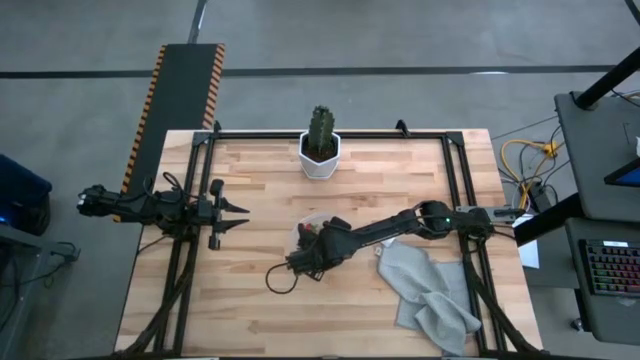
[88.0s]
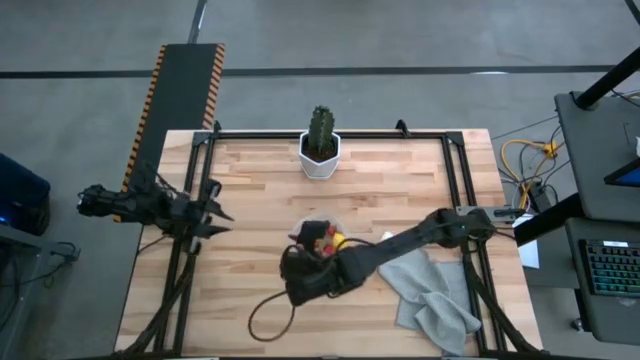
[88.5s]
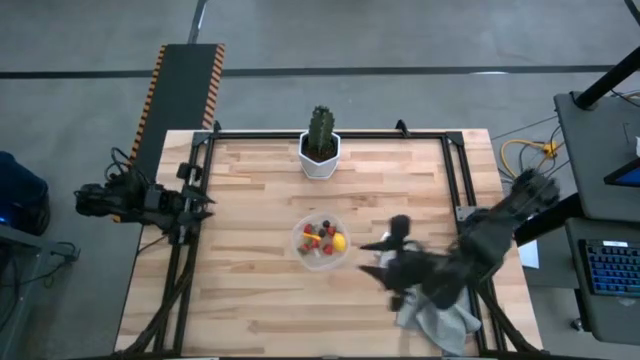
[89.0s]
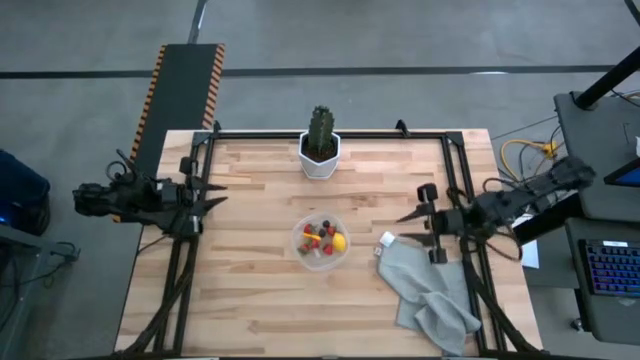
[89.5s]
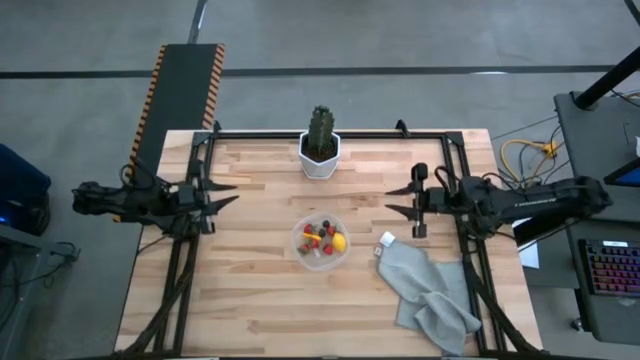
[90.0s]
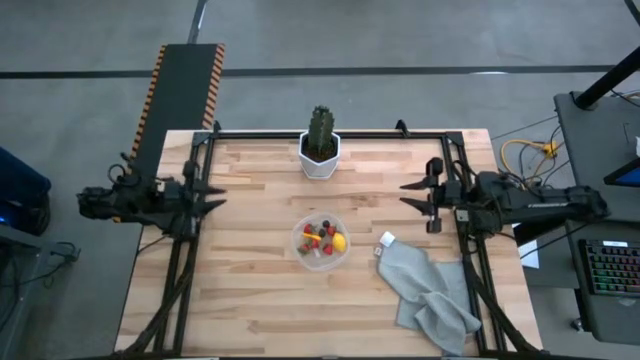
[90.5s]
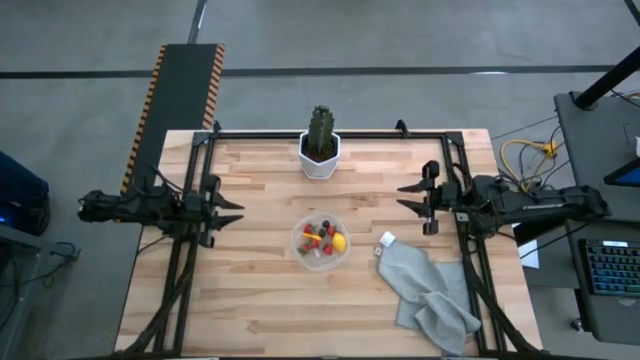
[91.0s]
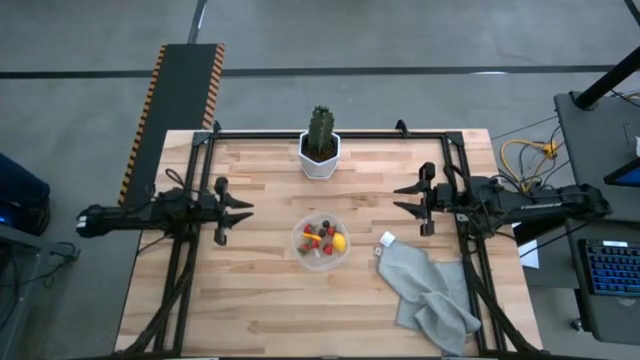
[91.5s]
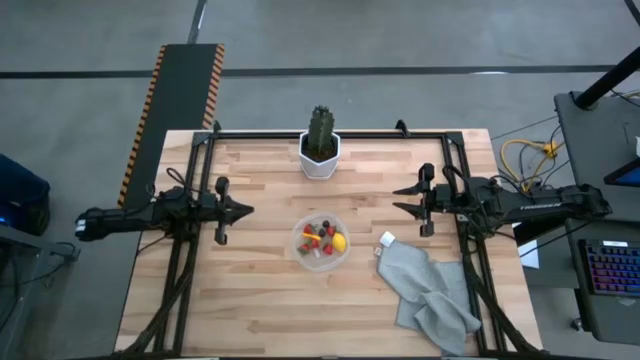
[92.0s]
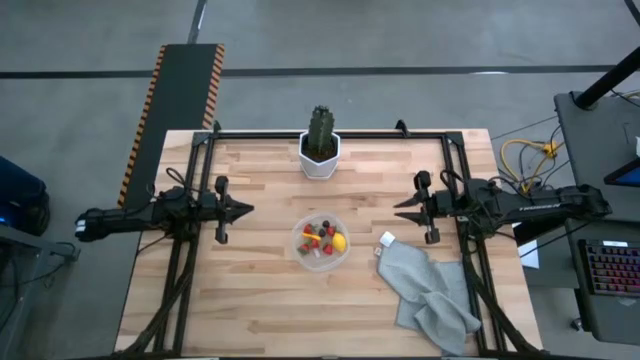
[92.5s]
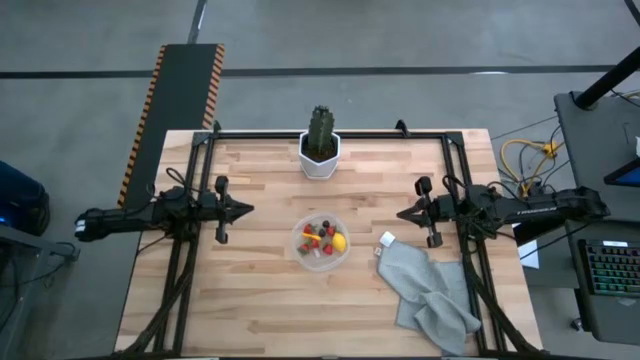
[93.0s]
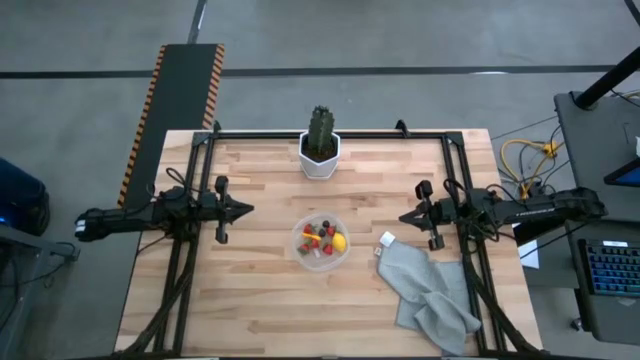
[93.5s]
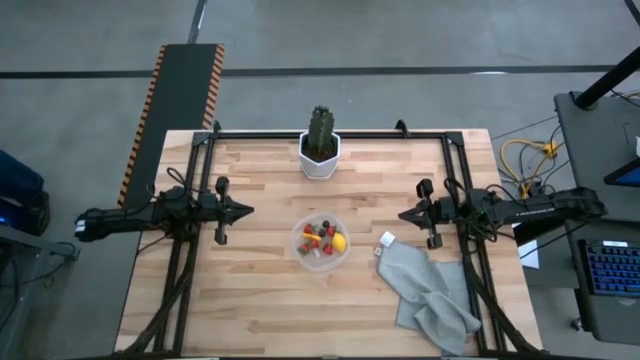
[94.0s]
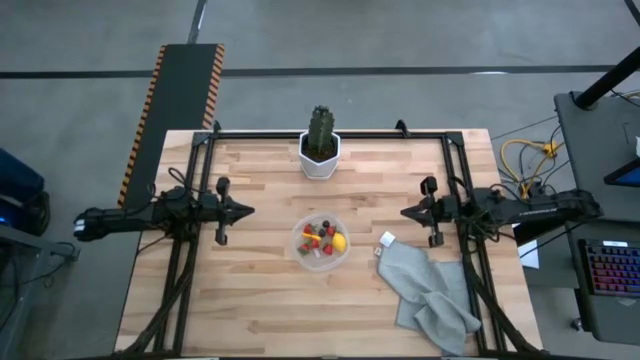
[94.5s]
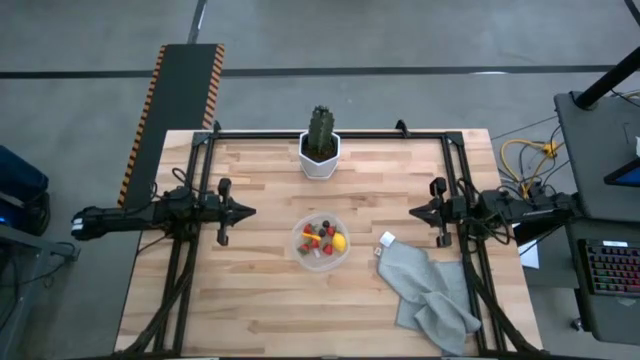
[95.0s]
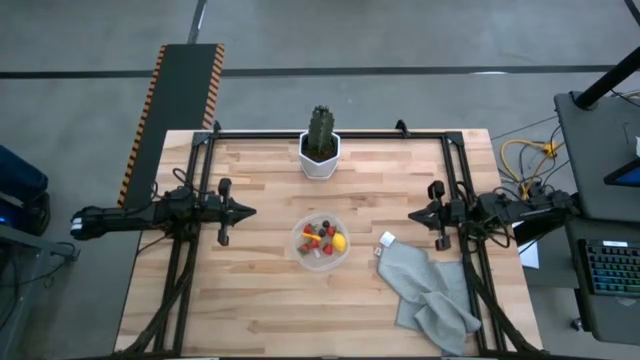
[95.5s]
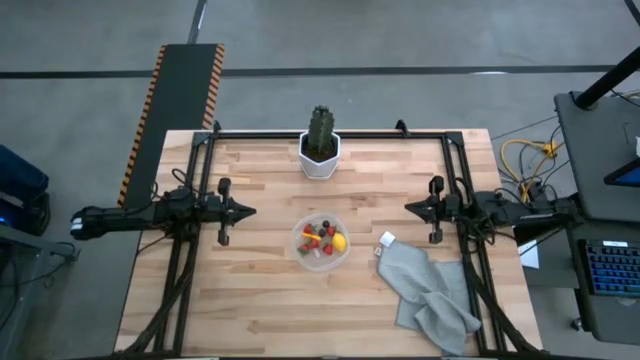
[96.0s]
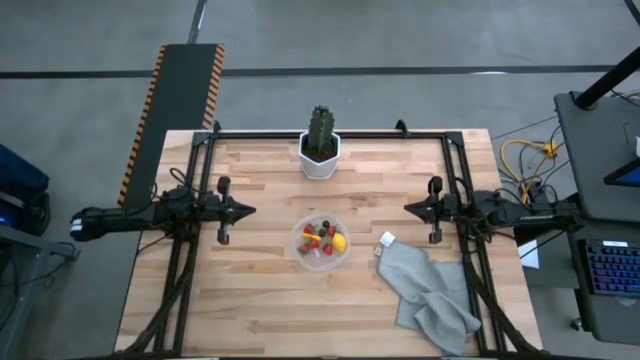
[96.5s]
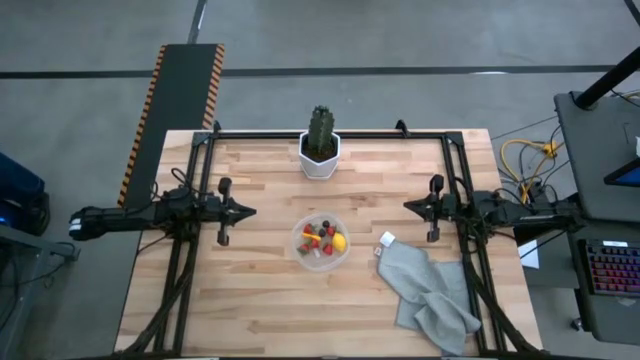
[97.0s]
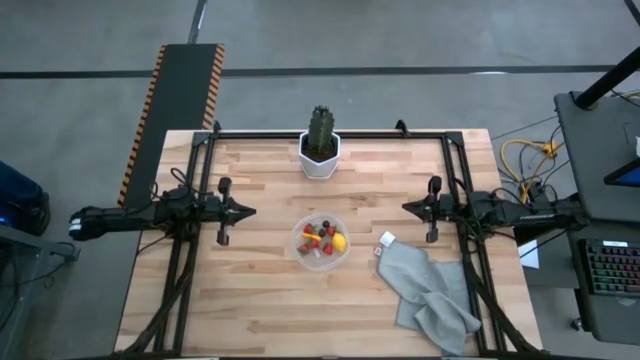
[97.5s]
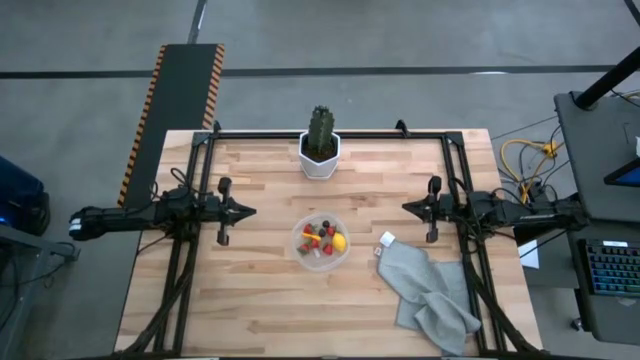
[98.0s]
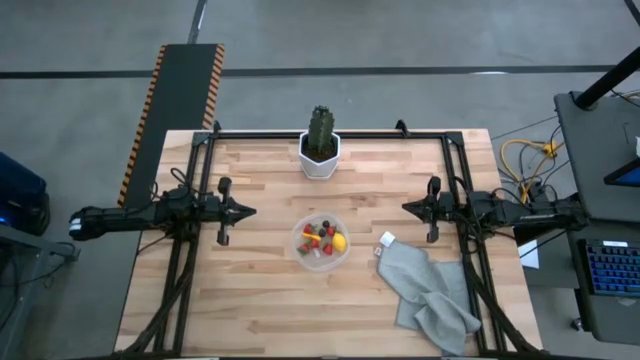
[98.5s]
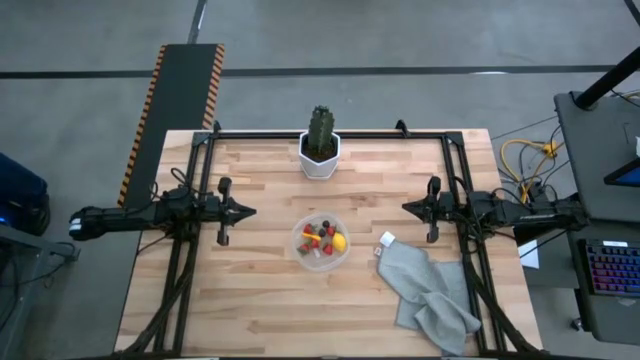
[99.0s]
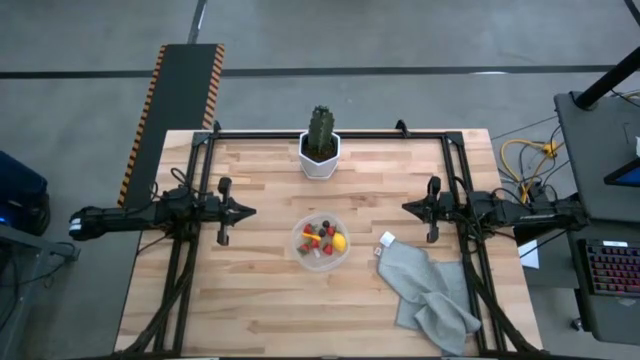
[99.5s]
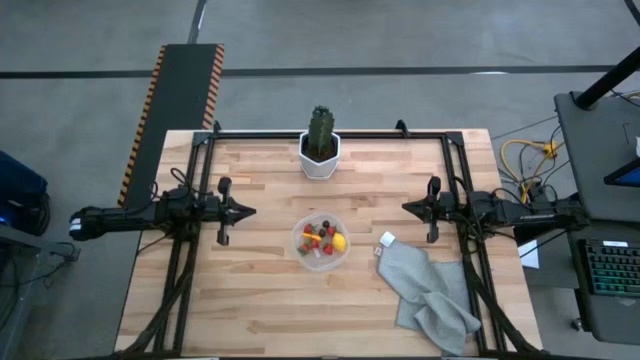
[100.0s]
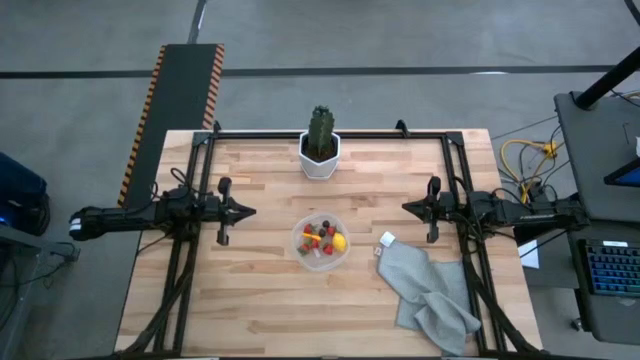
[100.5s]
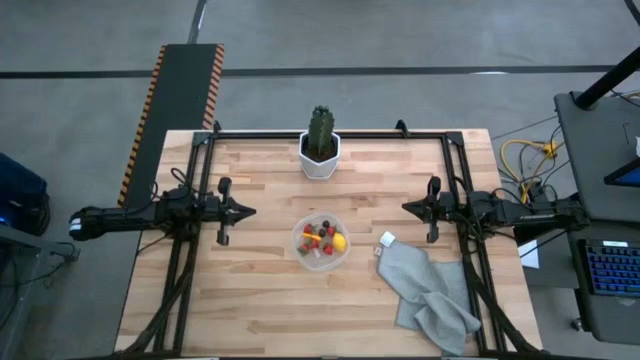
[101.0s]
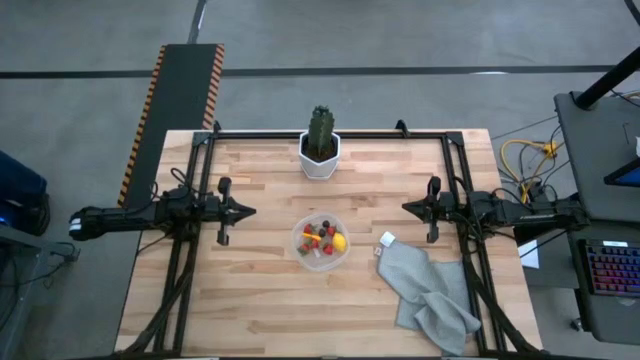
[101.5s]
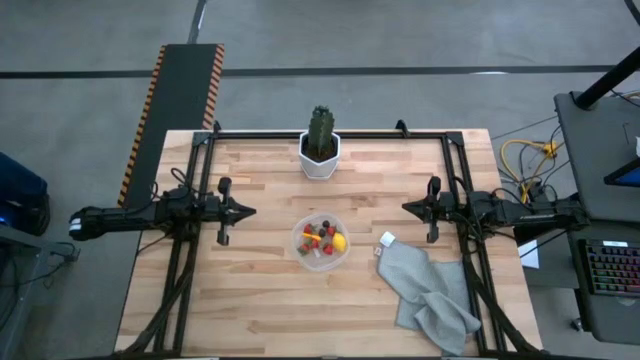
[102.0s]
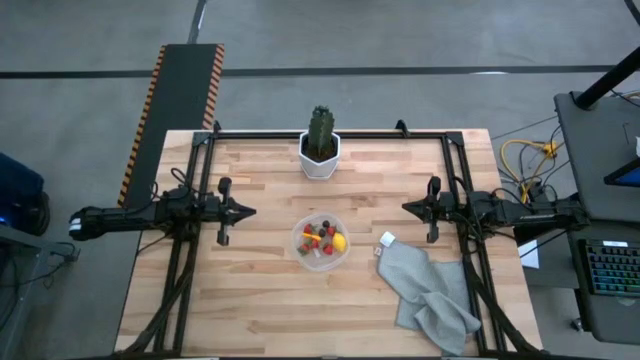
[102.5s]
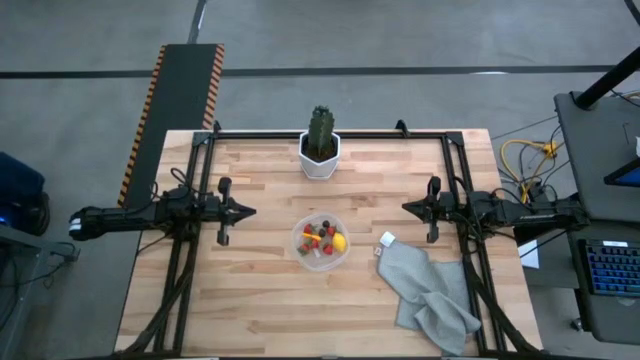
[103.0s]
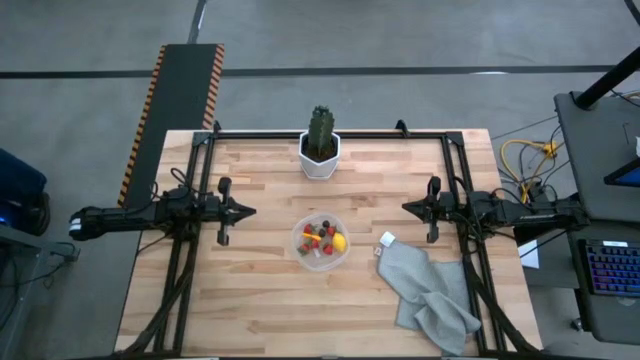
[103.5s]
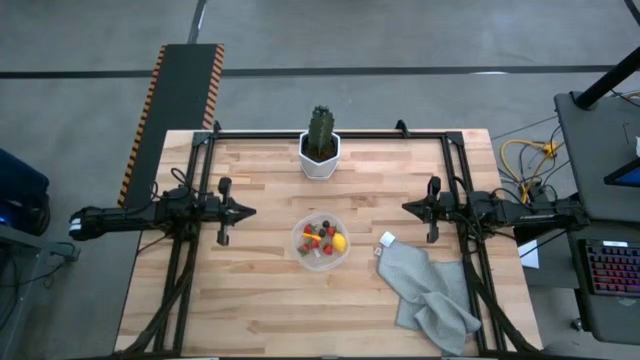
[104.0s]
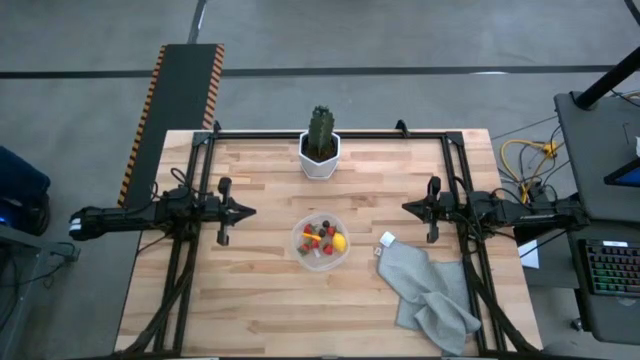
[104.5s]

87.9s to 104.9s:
Task: Pick and placing Produce into tupperware
Return to Home Position

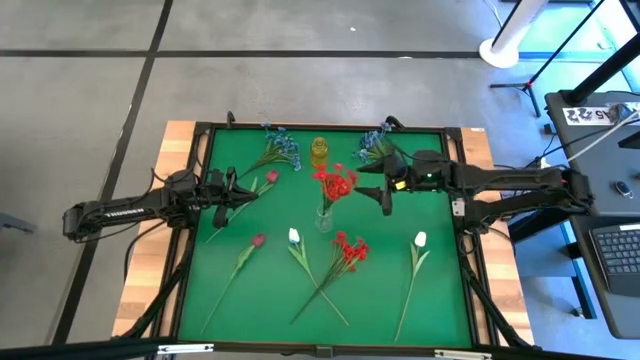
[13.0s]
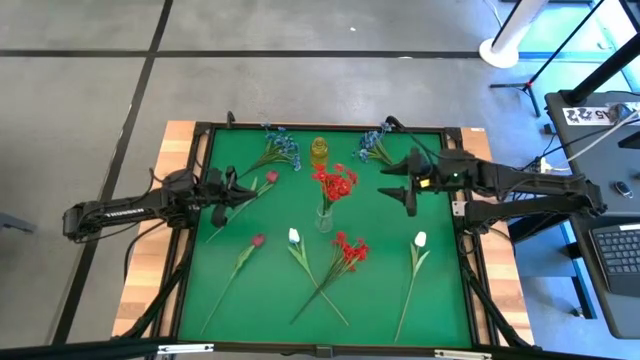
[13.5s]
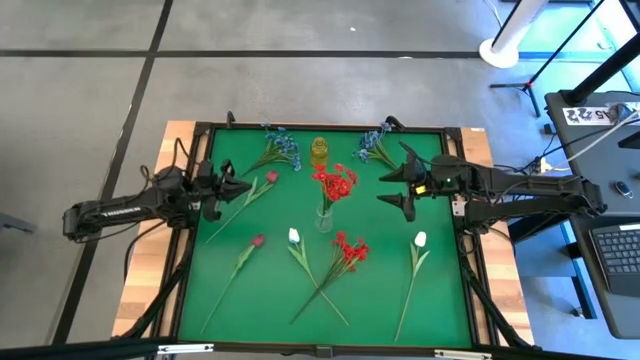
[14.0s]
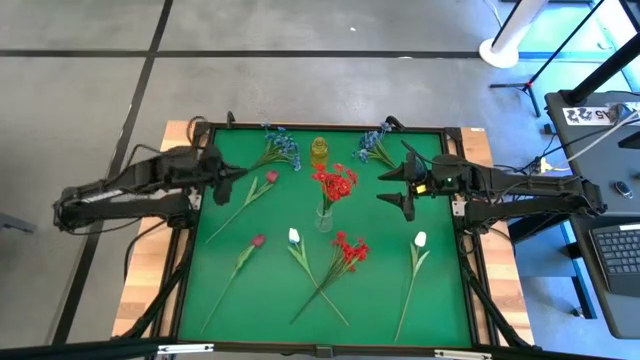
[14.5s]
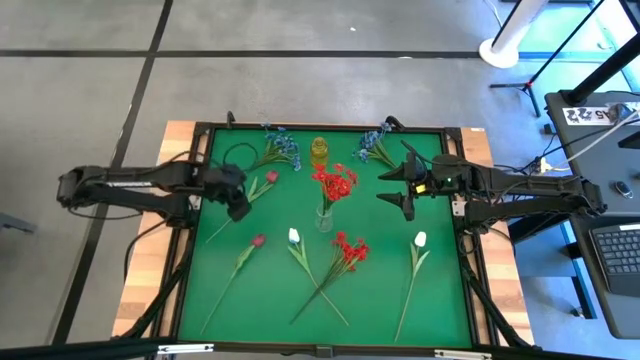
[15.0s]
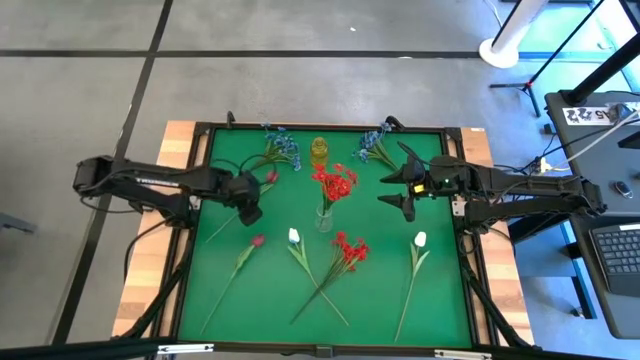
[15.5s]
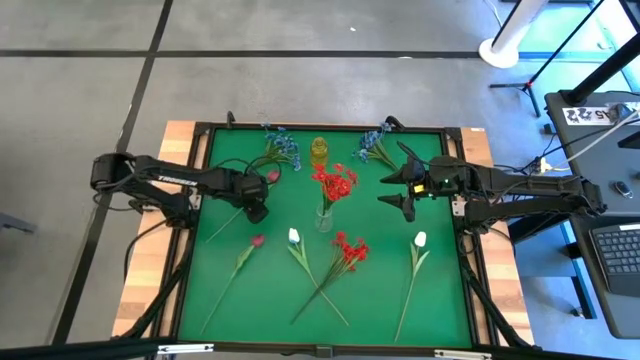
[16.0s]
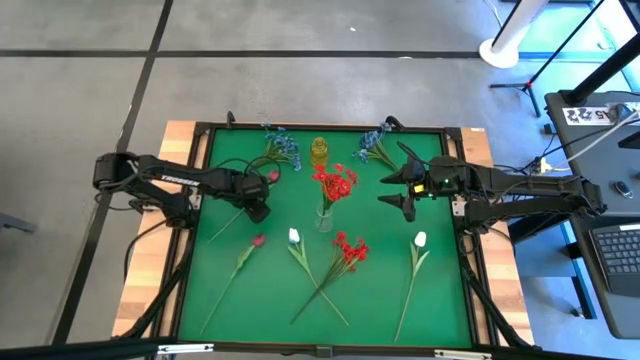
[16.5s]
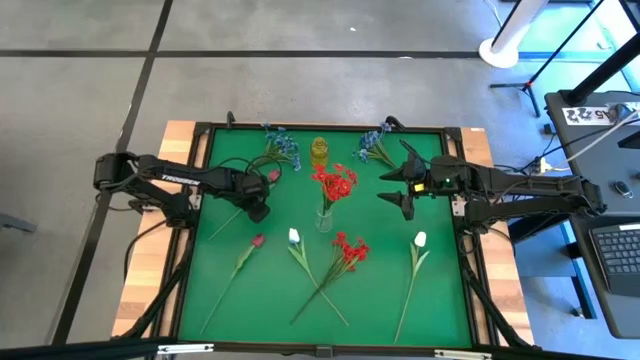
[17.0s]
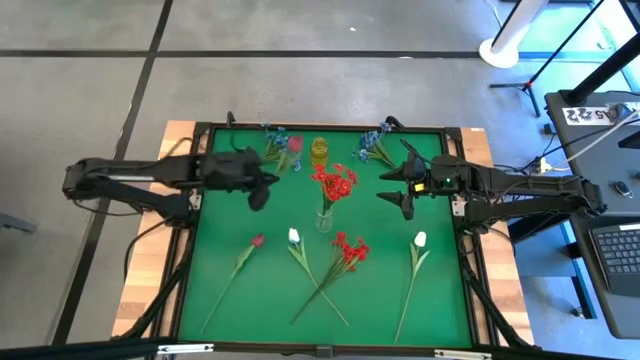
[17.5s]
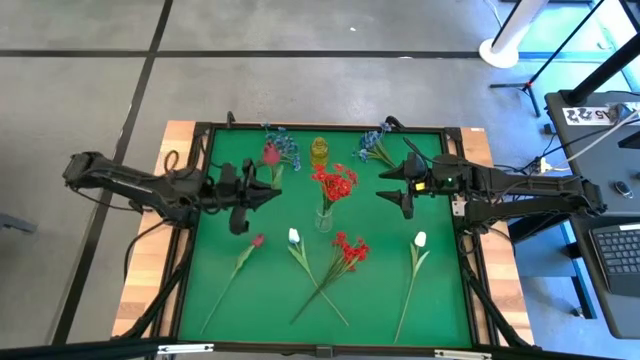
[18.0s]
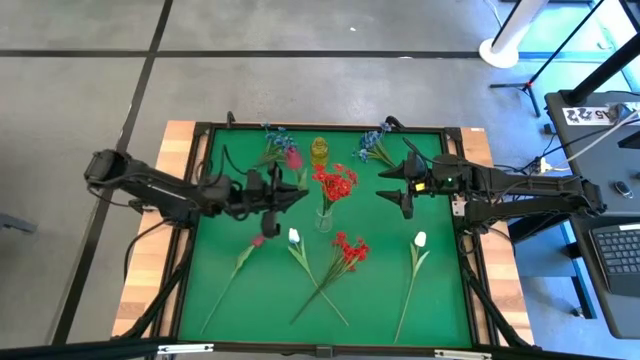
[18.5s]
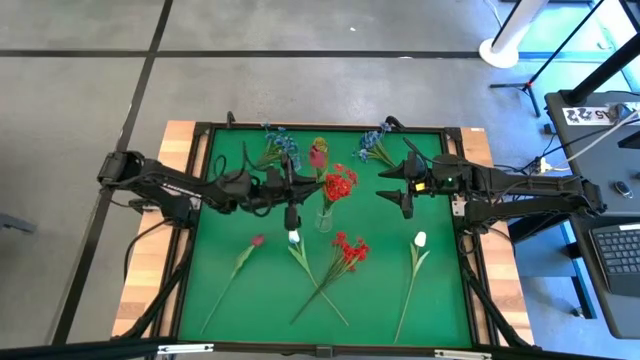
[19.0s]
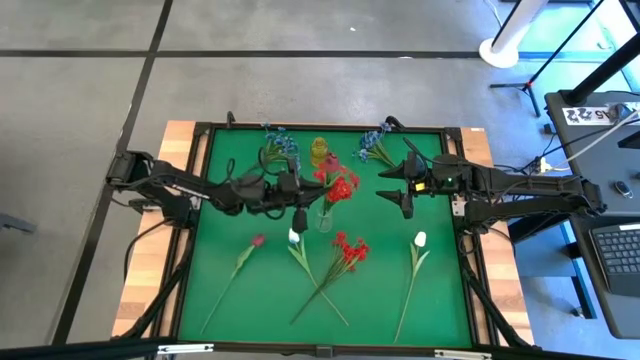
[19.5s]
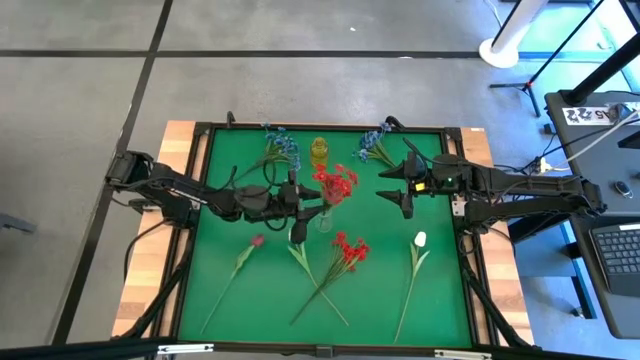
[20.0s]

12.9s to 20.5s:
Task: Sort flowers into vase by color
Put the top dark red flower into the transparent vase
